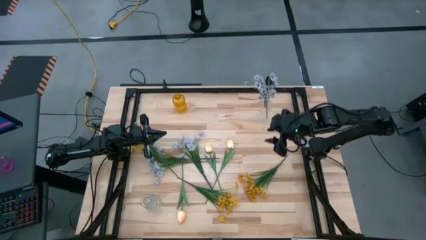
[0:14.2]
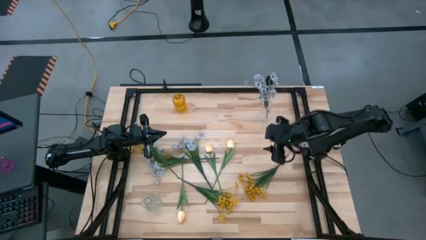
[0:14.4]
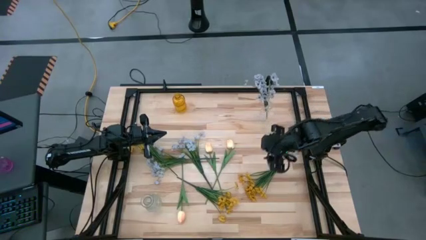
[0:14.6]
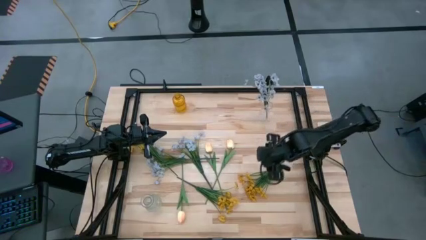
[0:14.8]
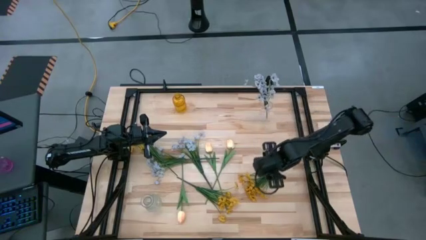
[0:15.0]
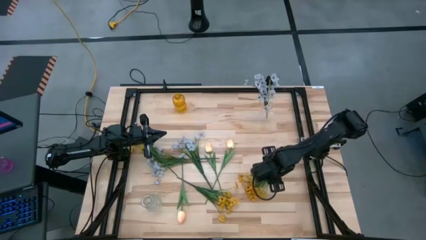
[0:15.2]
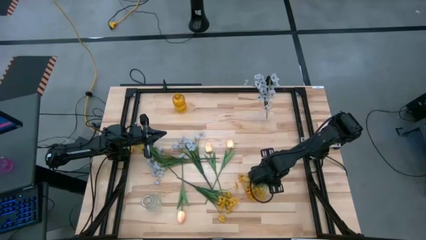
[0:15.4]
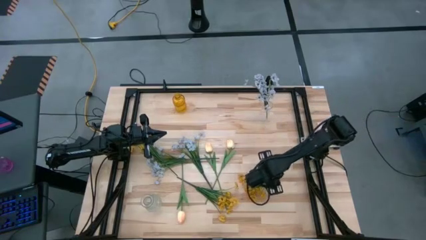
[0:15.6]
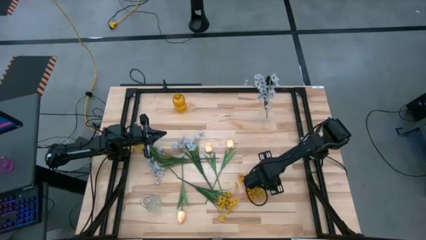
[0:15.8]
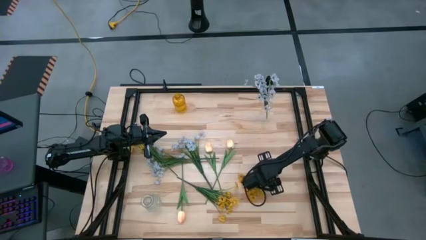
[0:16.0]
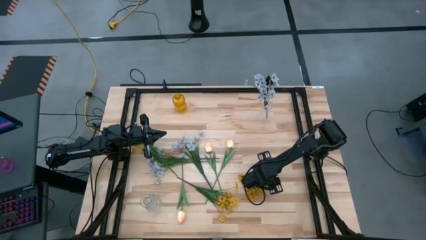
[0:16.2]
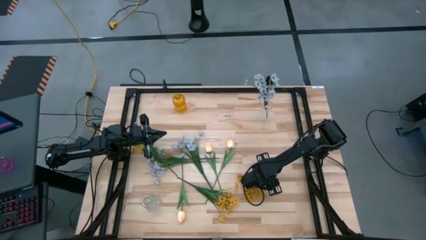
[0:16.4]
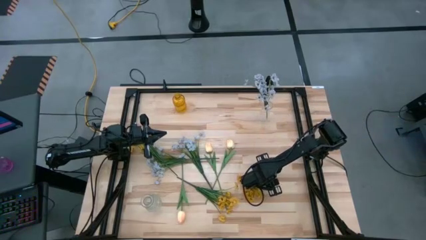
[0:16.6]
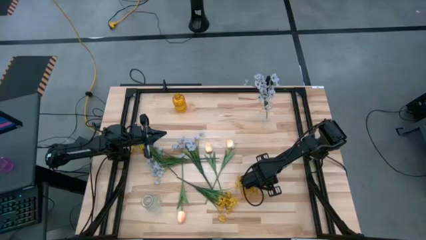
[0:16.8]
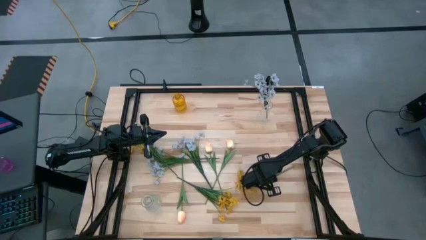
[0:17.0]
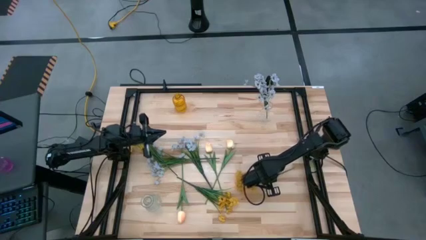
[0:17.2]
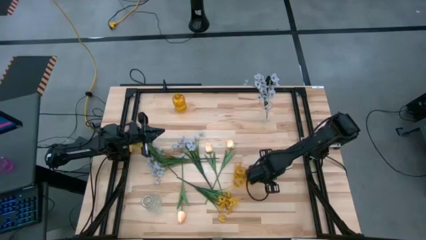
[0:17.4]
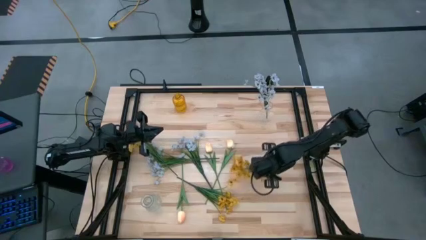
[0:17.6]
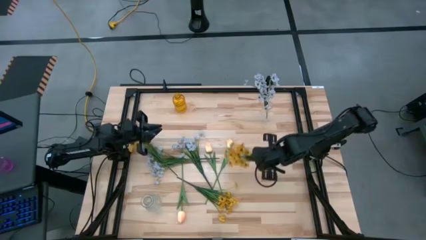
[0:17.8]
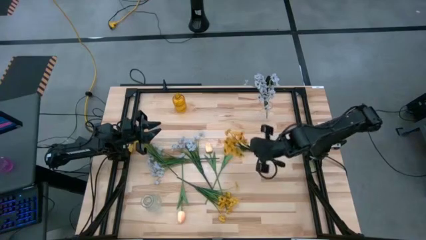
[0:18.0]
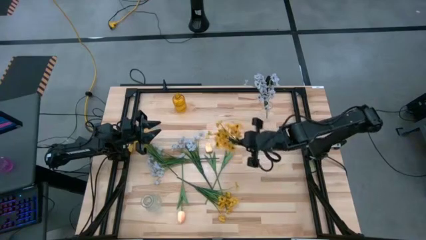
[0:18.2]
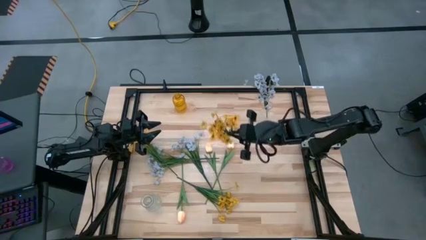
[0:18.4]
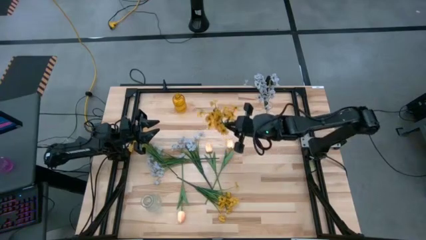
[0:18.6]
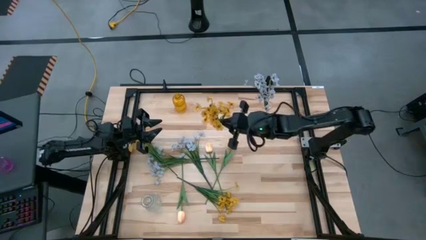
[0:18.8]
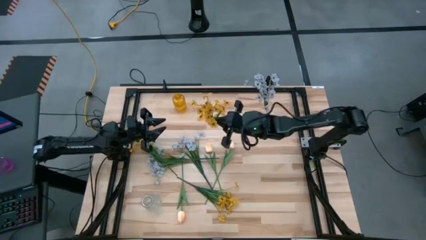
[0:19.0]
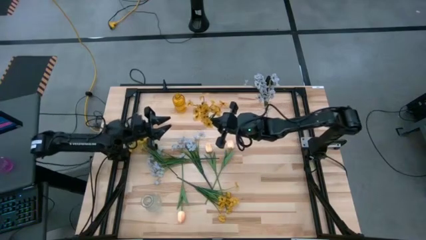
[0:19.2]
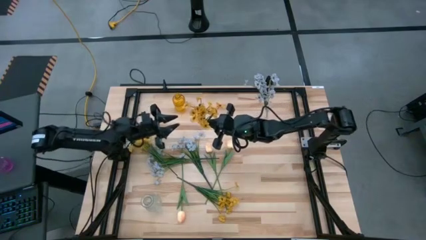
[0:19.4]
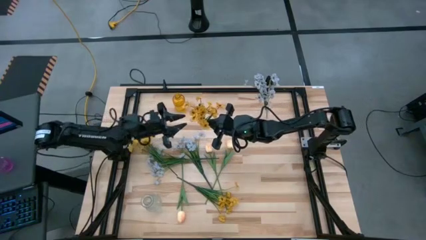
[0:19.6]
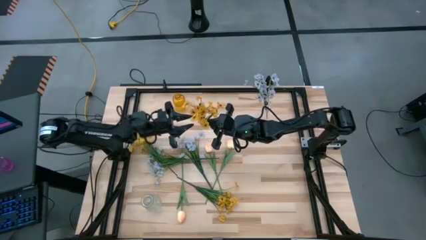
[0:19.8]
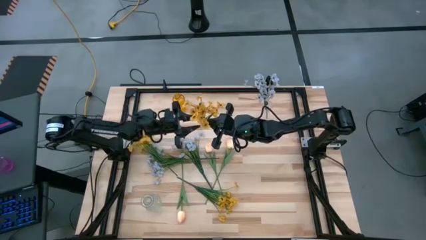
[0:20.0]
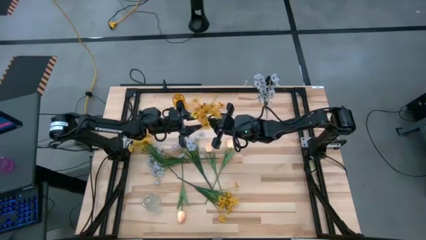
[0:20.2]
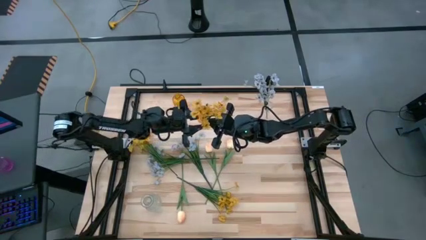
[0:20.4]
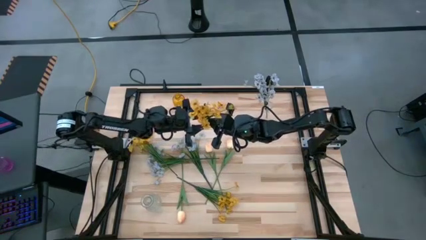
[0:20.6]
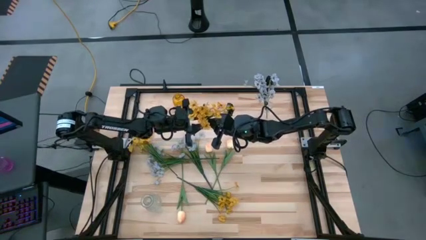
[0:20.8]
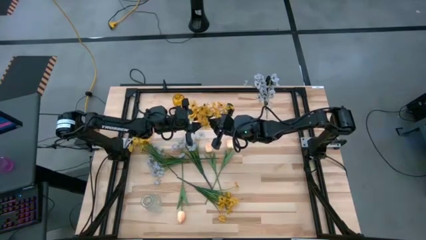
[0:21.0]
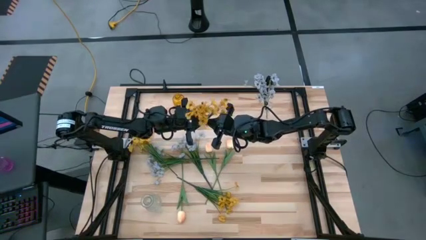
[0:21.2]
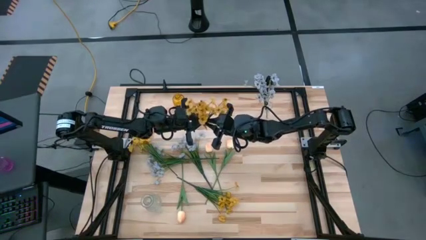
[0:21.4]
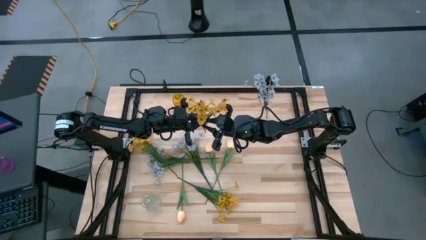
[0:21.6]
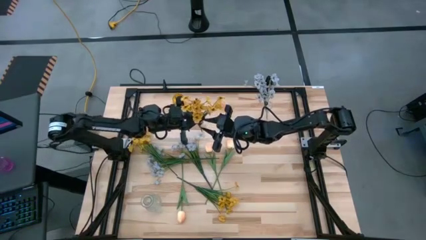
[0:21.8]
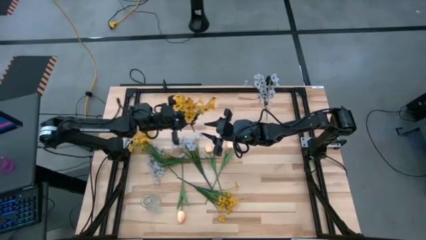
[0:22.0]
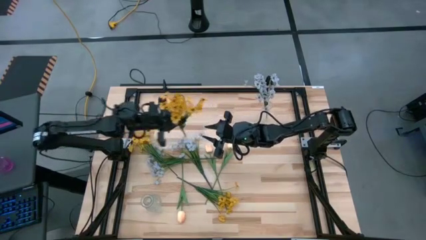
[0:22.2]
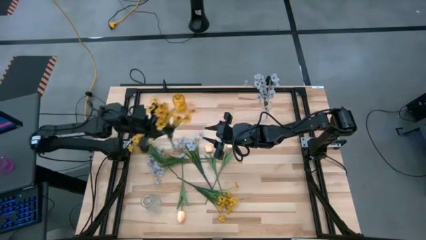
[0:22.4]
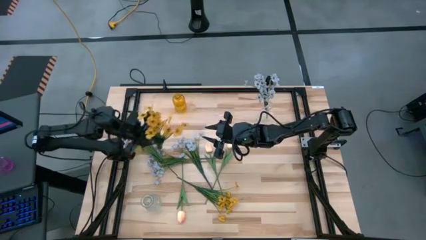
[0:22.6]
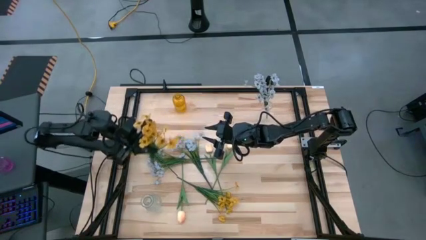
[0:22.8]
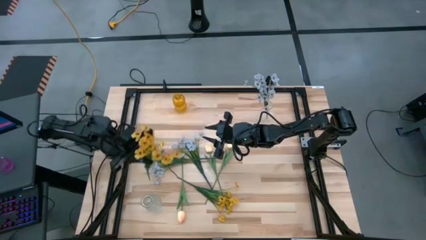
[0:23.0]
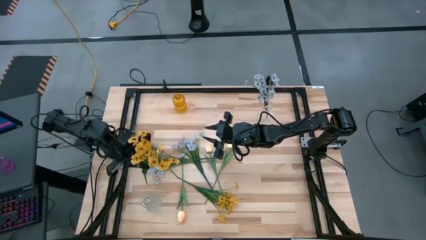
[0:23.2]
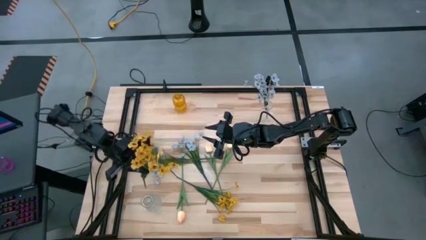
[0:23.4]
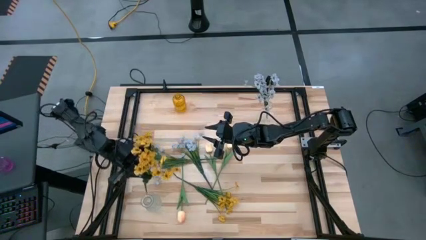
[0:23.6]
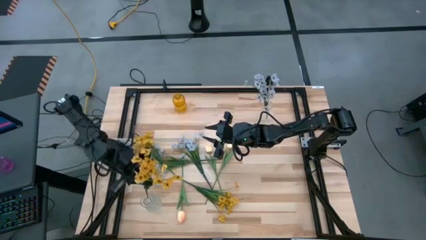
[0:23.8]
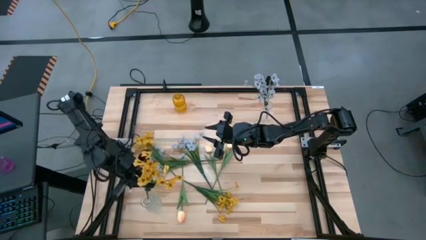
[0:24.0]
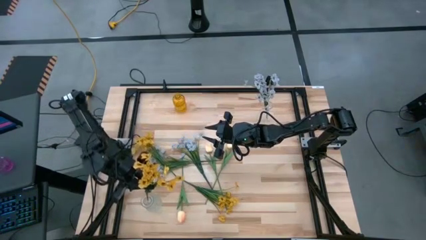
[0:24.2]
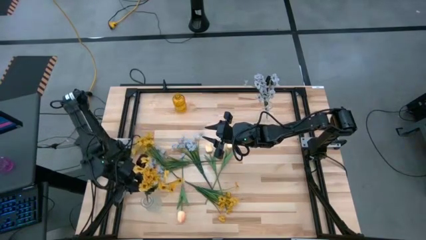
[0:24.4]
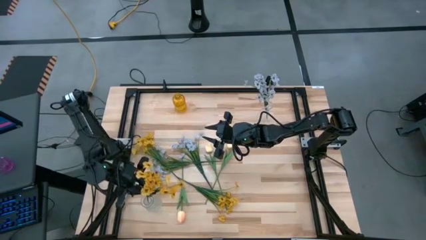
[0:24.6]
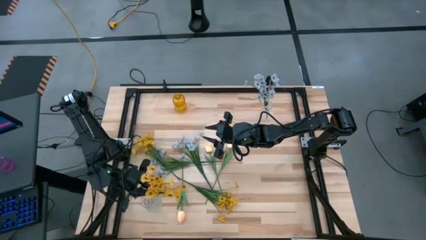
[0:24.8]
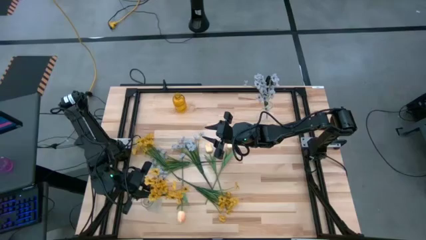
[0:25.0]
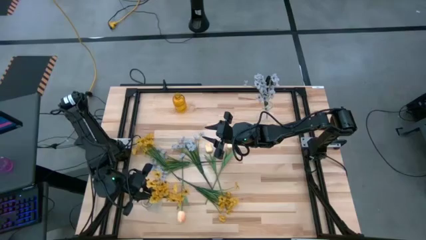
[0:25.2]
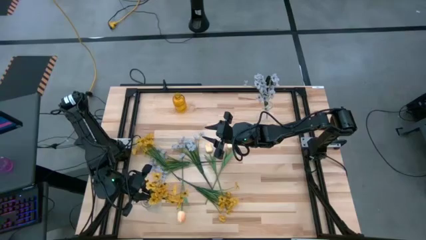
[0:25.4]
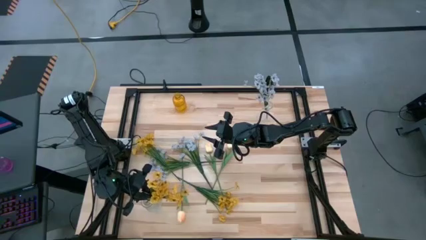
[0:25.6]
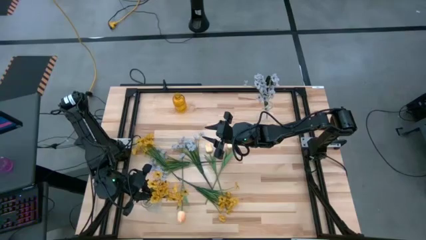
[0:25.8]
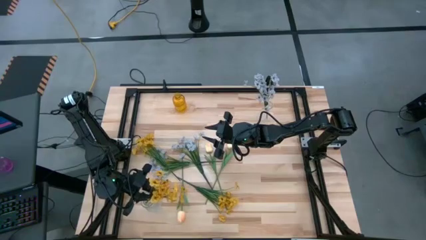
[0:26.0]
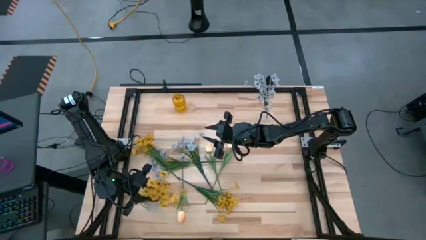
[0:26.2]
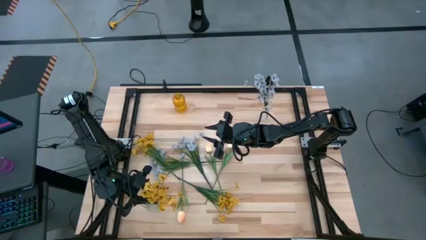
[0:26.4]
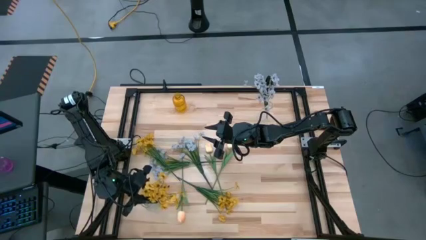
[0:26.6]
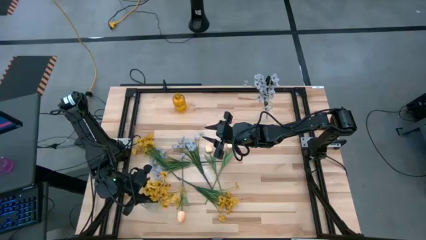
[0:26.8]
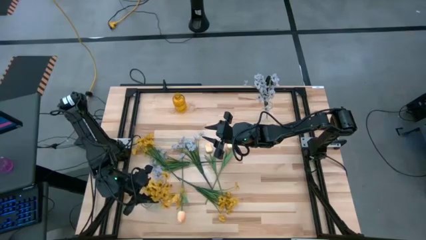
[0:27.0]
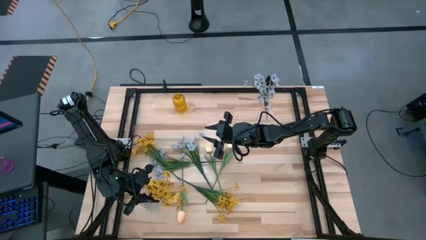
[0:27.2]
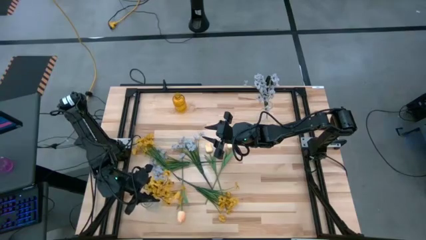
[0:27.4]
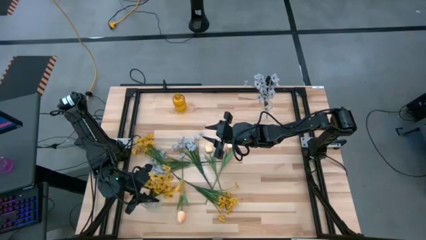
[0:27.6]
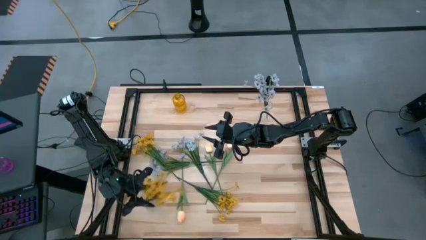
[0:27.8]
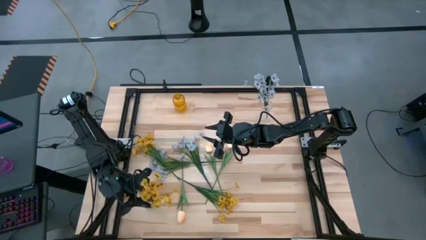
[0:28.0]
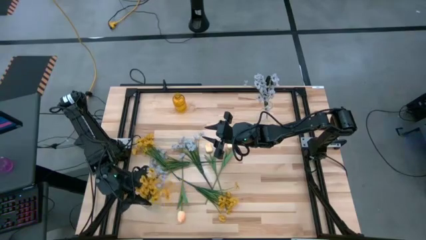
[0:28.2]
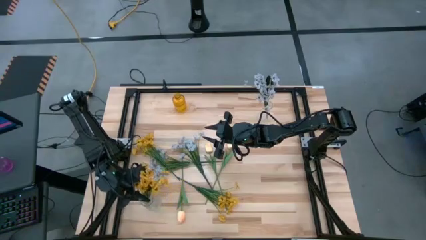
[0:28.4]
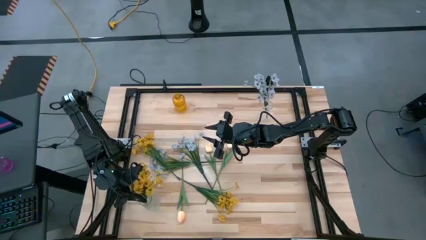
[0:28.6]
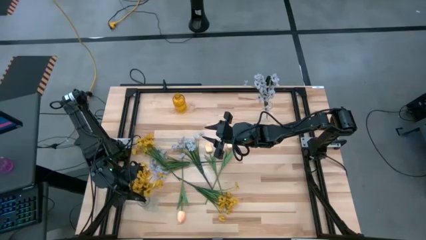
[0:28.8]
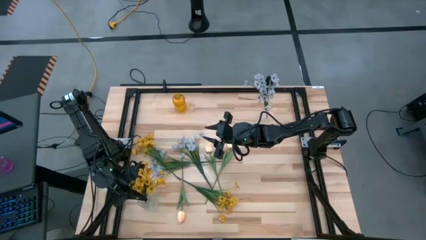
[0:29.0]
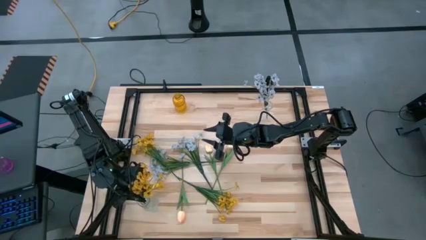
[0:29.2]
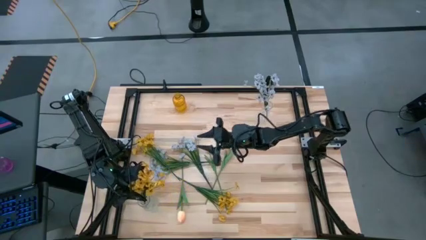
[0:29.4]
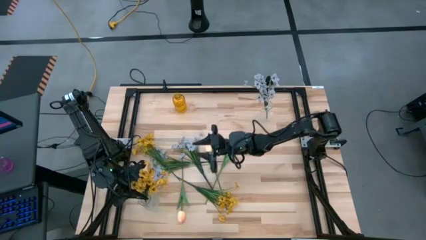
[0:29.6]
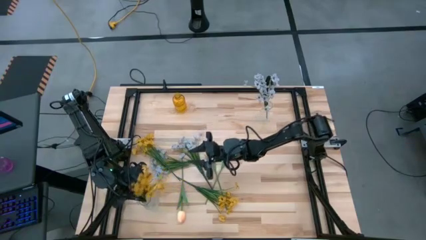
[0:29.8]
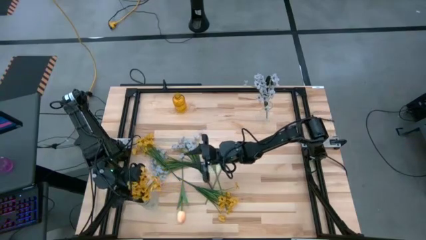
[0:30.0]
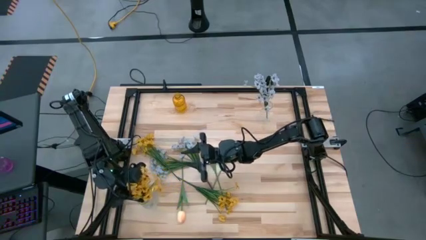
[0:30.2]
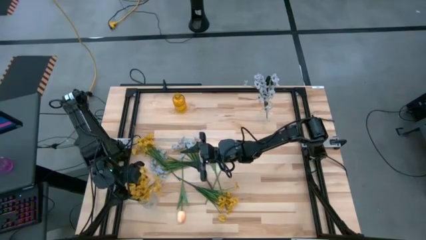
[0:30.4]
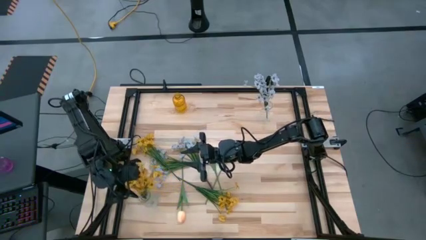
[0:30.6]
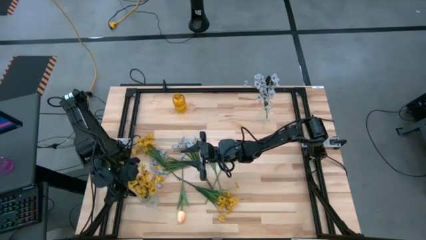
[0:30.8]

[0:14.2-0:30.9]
Task: Sort flowers into vase by color
Put the middle yellow flowers into the bottom transparent vase
